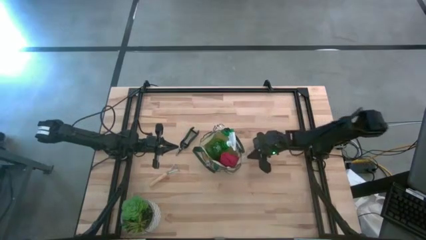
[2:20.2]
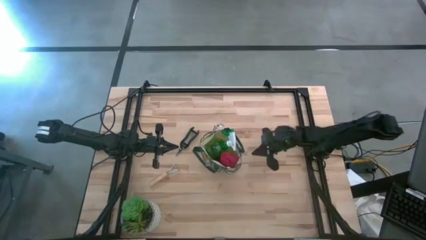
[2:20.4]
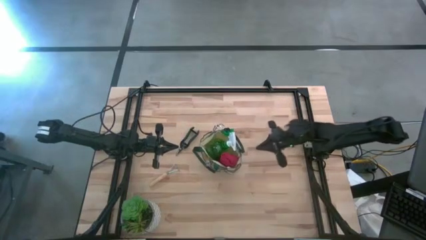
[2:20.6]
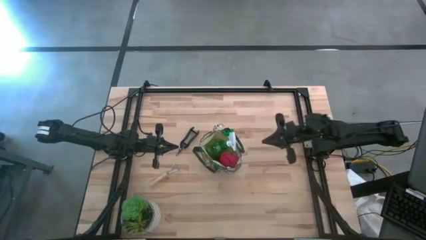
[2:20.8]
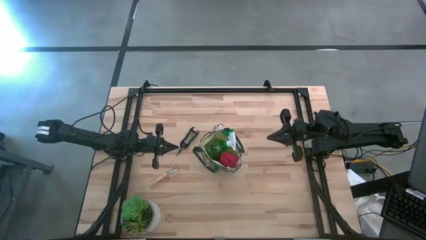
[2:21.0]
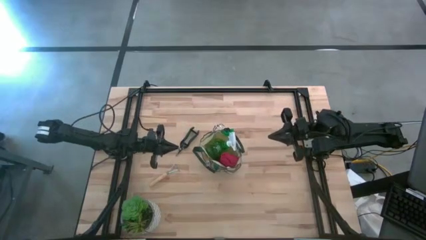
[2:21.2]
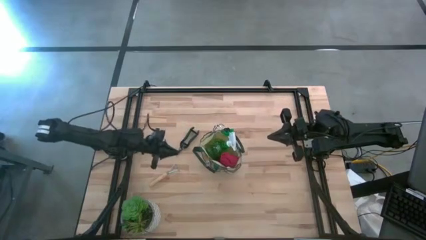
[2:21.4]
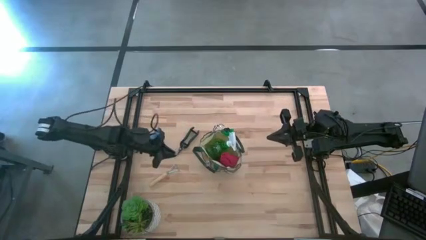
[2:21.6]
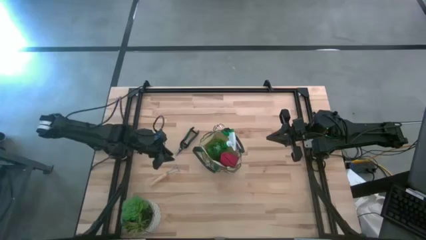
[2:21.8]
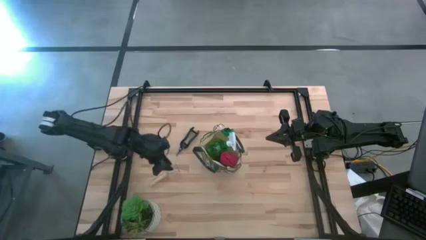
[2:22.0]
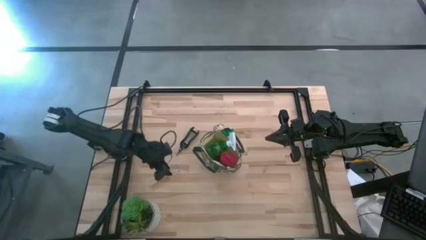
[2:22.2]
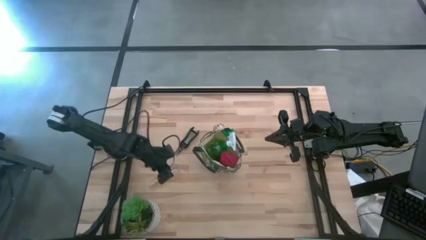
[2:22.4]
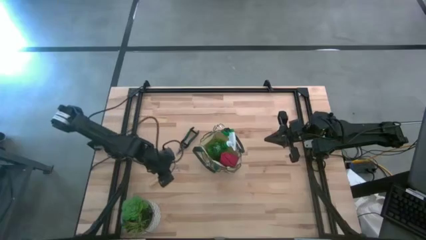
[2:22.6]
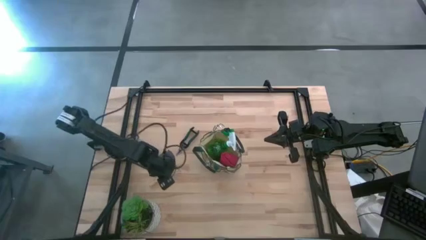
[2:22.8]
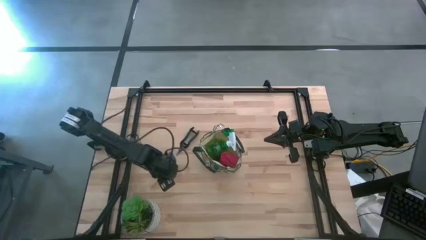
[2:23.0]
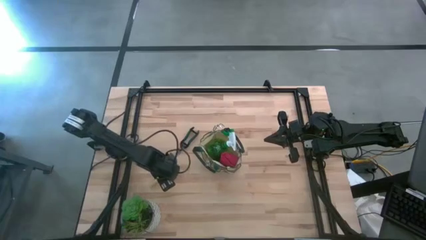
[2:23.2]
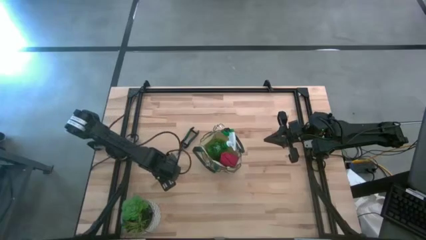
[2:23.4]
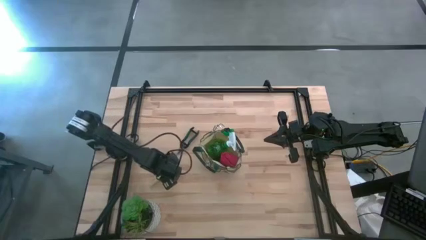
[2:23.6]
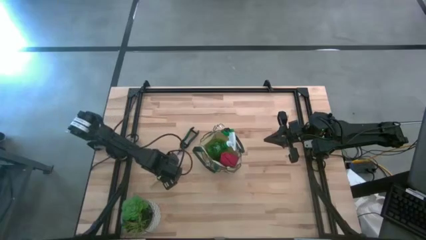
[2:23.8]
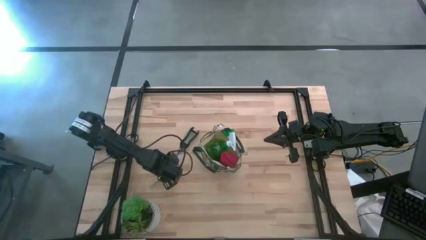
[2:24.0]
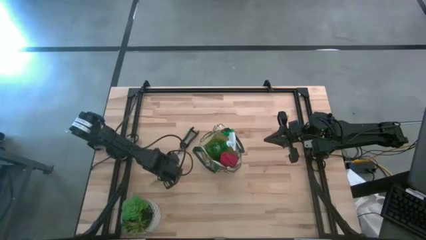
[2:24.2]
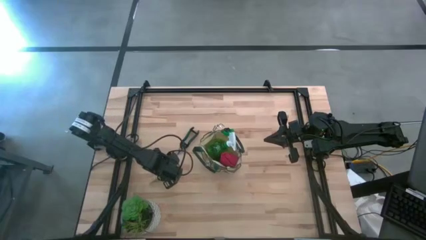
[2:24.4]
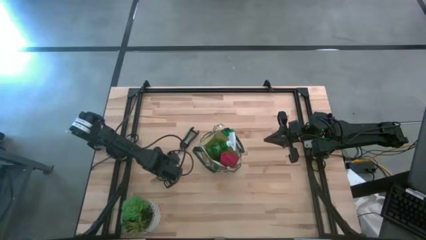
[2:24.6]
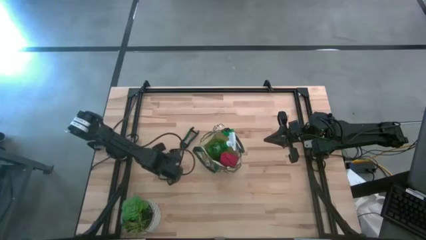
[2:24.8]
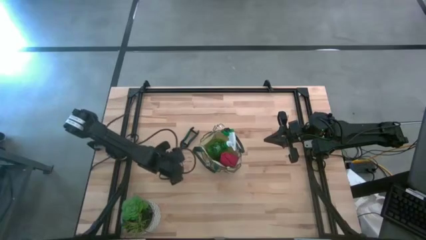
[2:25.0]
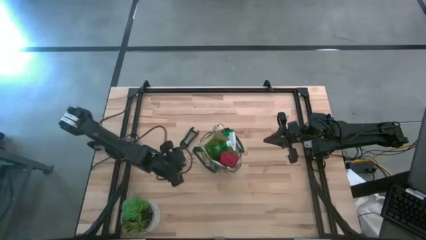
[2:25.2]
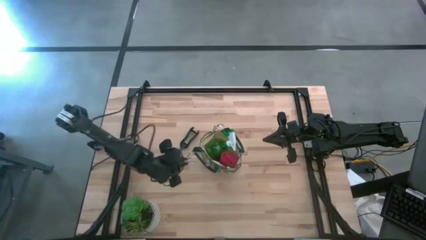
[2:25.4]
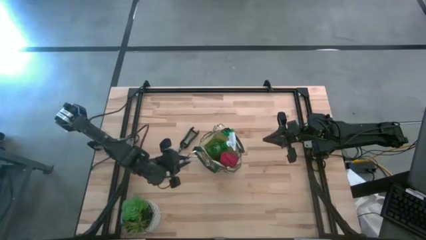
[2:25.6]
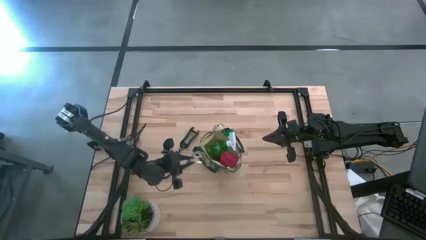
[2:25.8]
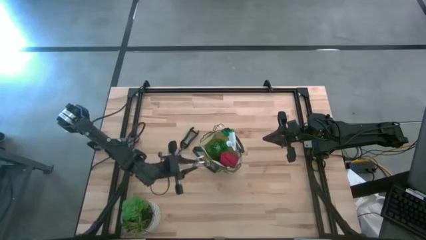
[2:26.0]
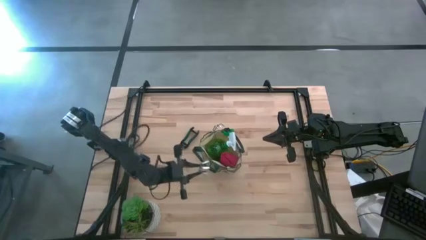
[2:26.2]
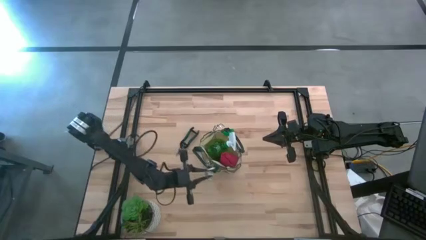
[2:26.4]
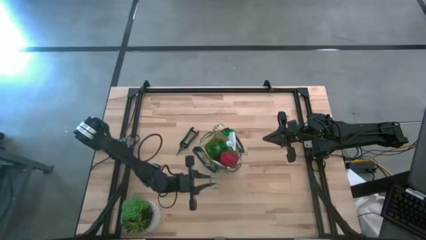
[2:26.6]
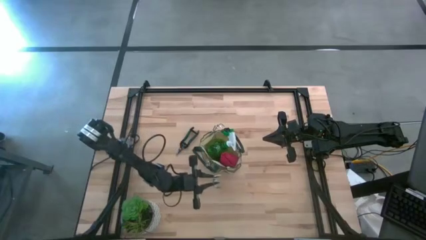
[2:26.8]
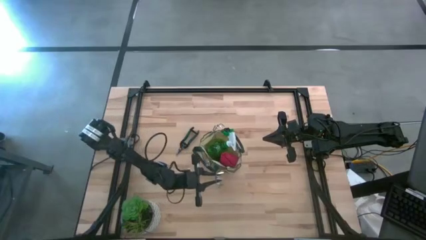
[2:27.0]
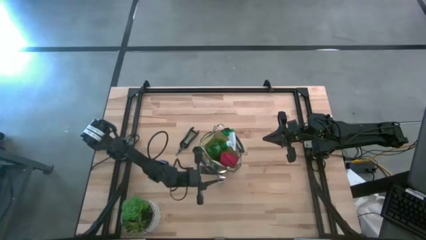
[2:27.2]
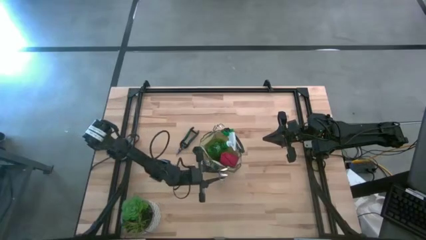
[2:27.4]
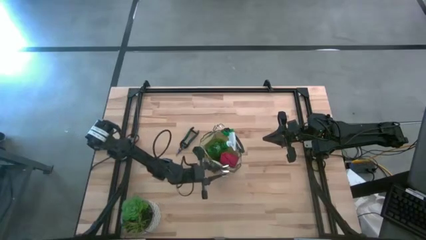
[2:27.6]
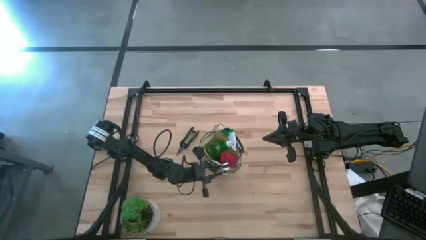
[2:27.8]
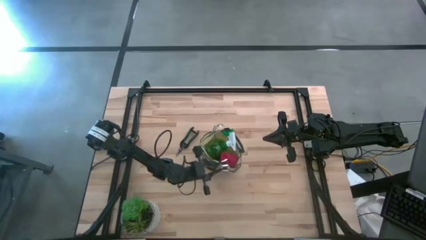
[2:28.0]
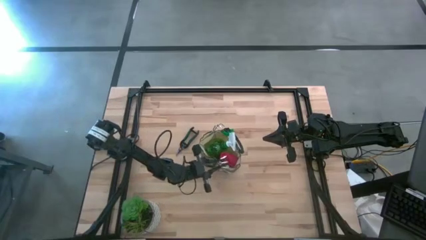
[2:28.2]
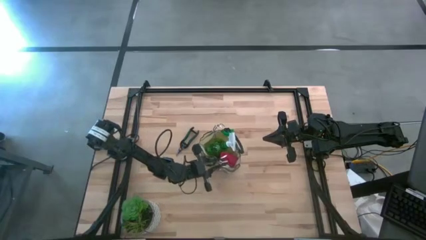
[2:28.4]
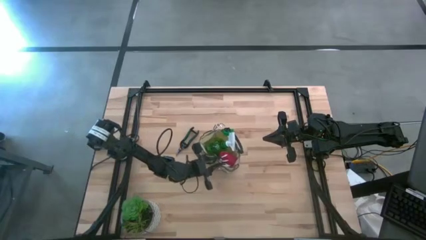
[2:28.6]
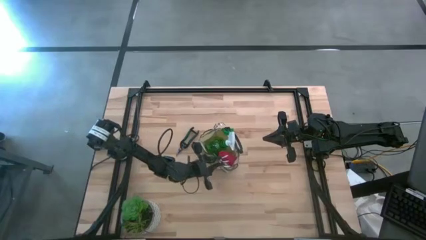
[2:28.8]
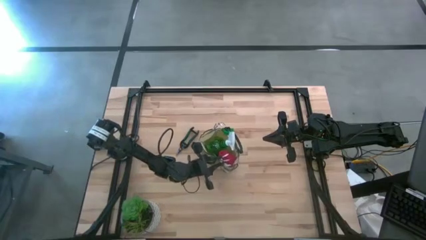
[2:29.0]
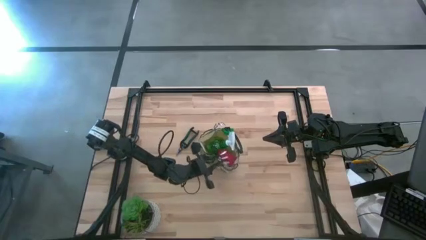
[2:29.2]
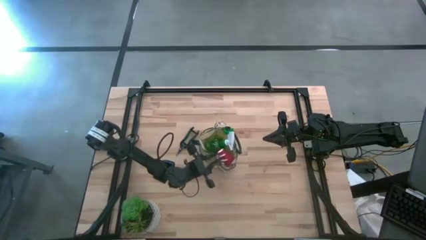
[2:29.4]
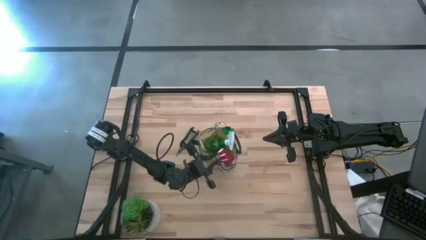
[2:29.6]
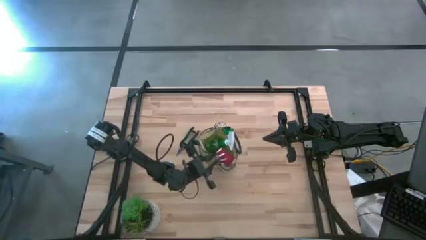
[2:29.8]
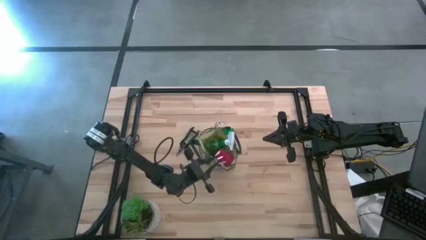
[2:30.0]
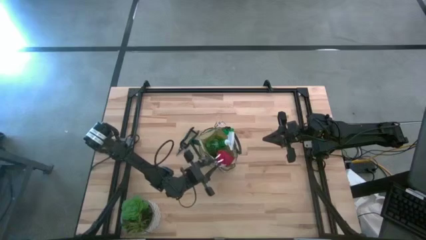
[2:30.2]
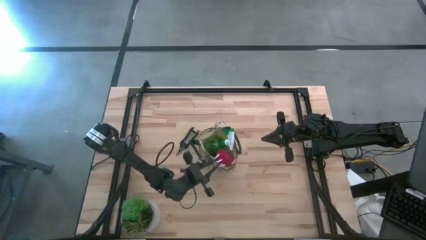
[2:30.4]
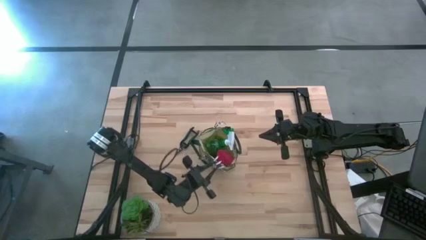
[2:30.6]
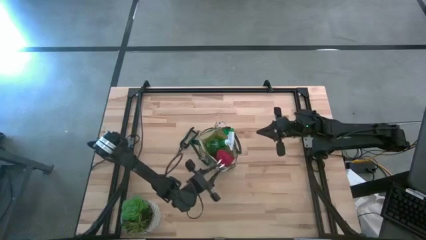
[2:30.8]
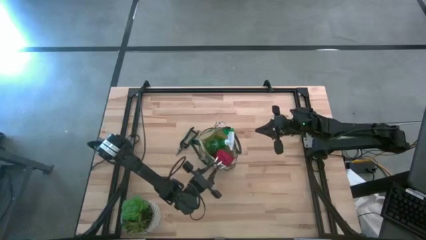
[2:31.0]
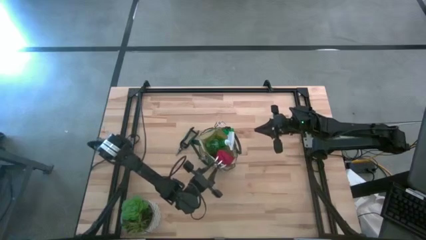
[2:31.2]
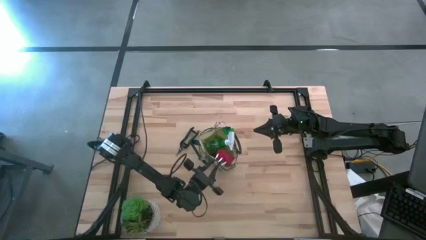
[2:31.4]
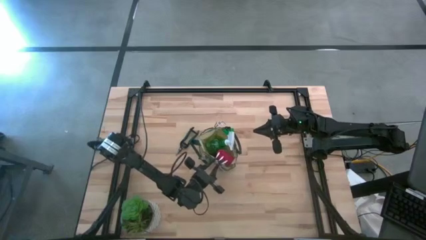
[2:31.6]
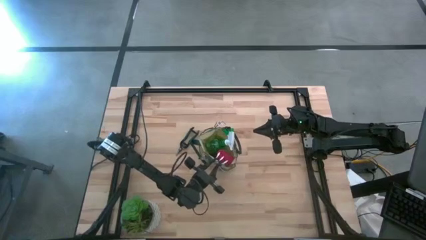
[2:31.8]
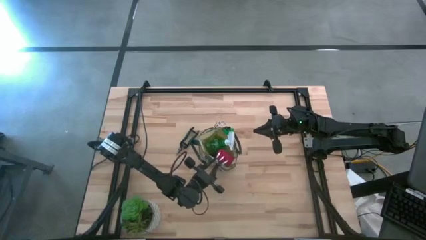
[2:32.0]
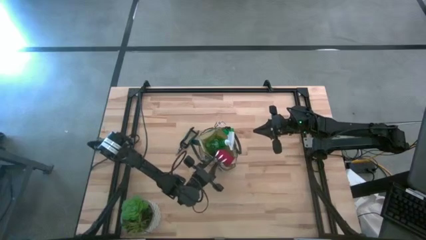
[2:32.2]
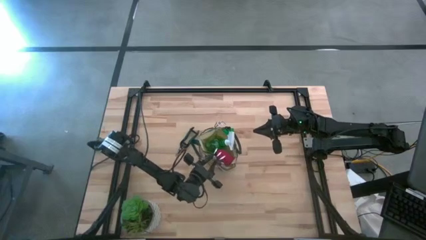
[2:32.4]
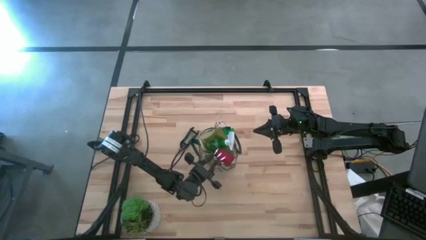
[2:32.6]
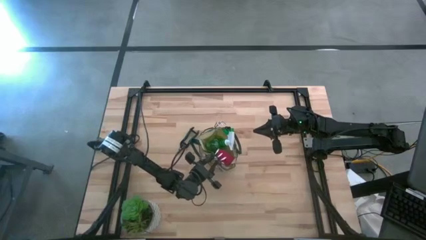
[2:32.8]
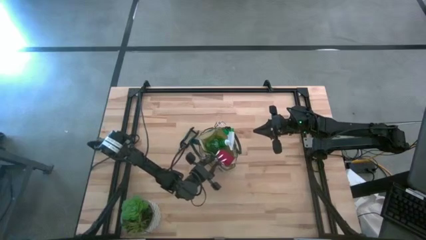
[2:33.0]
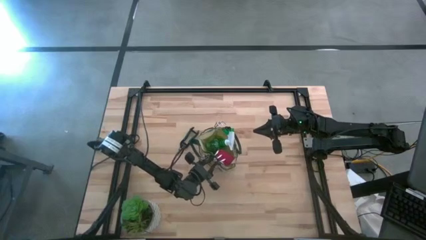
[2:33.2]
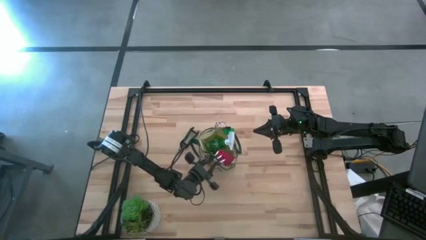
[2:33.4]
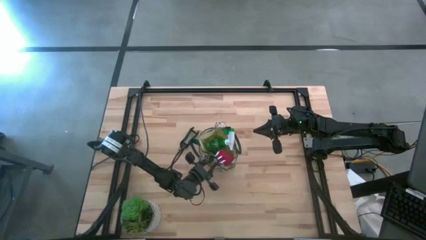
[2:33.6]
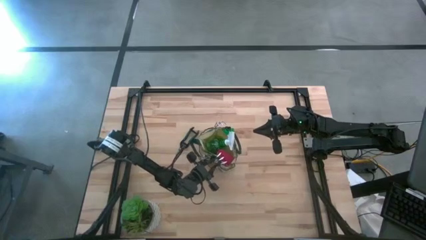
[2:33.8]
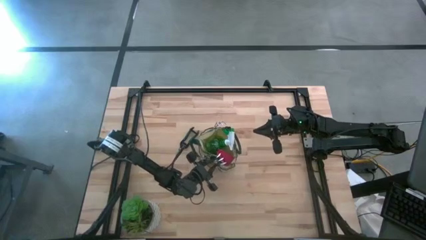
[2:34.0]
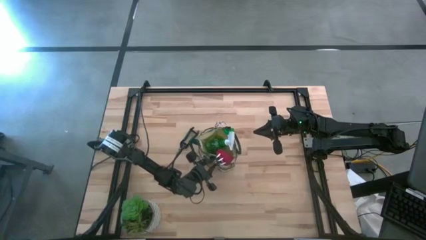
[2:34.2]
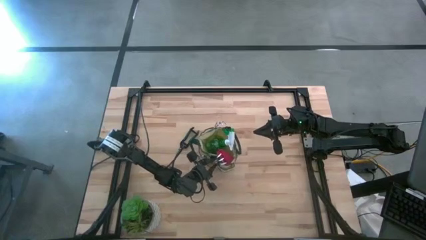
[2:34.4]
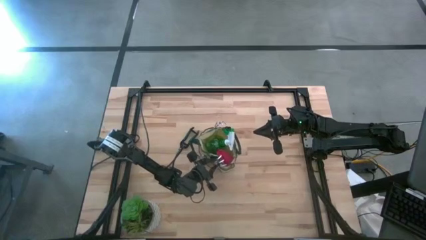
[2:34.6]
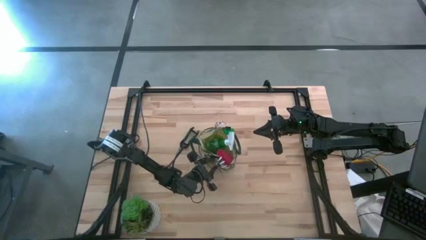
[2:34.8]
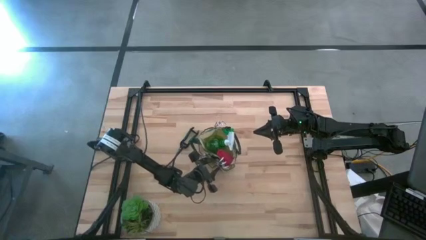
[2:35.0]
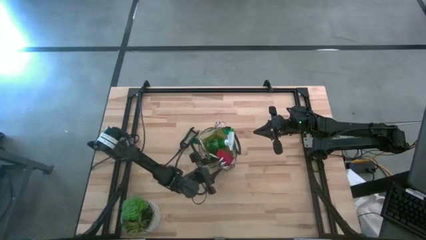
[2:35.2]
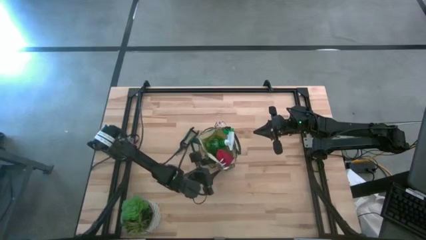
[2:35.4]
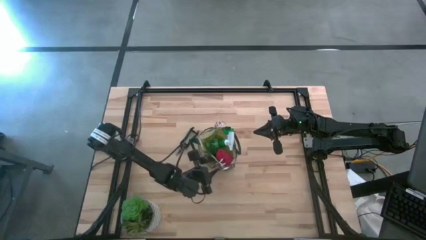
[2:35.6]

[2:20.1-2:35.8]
Task: Pick & Place Garden tools in Gardening bag
Put the hand rake into the pocket of the gardening bag
